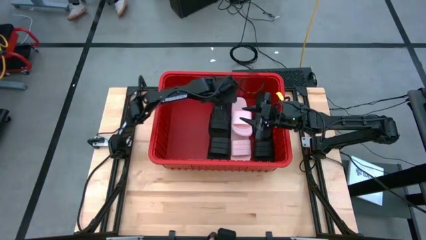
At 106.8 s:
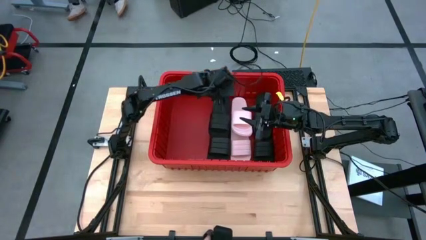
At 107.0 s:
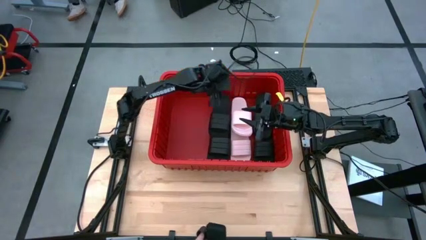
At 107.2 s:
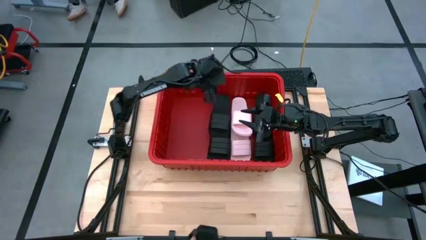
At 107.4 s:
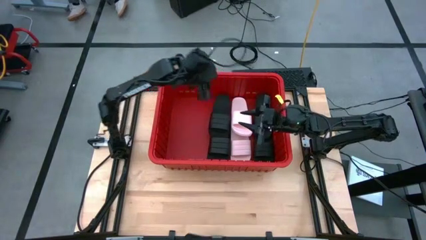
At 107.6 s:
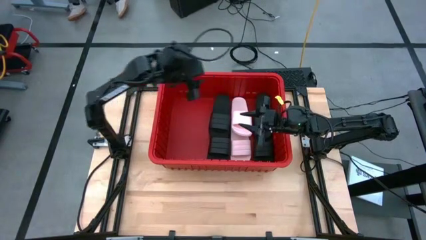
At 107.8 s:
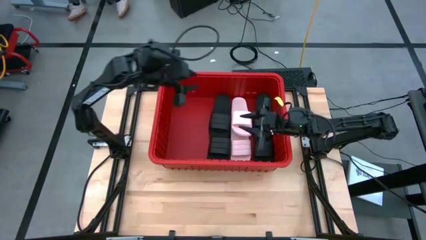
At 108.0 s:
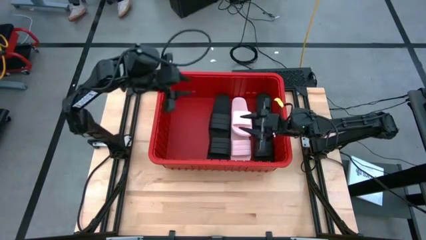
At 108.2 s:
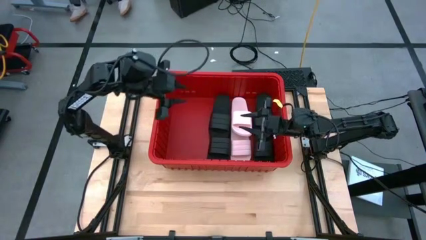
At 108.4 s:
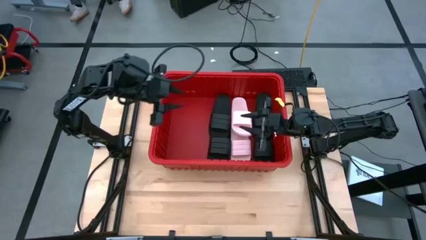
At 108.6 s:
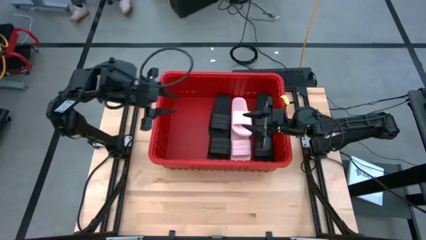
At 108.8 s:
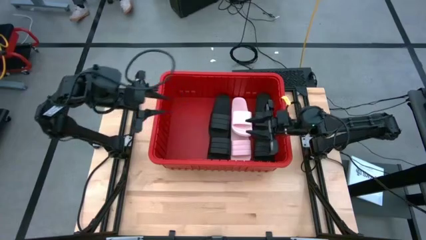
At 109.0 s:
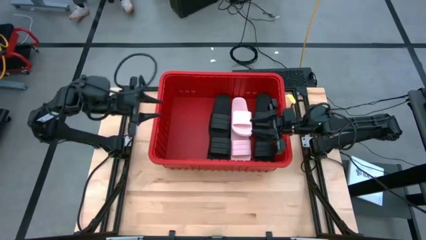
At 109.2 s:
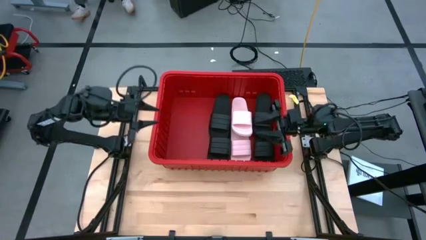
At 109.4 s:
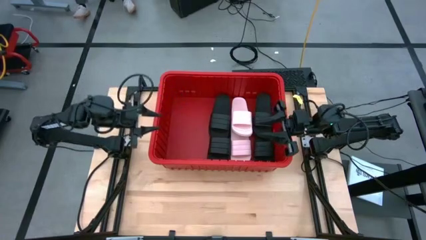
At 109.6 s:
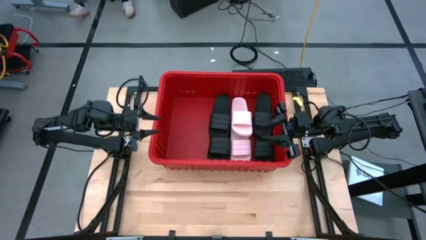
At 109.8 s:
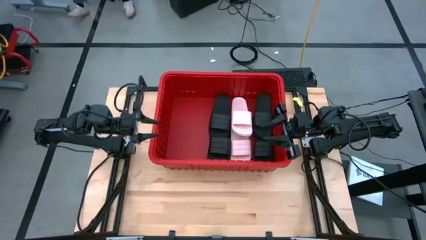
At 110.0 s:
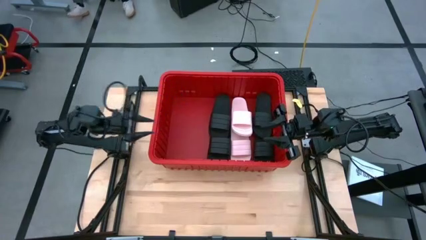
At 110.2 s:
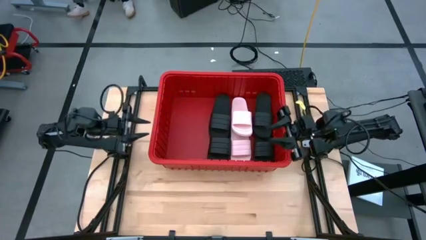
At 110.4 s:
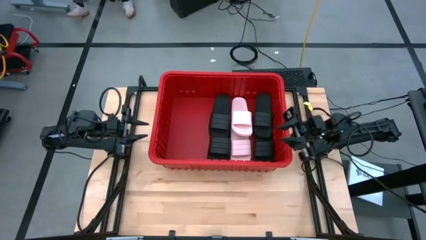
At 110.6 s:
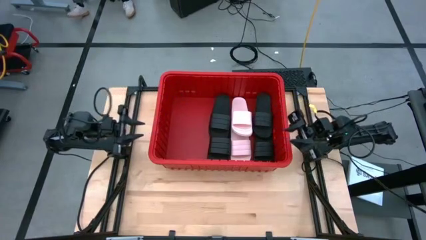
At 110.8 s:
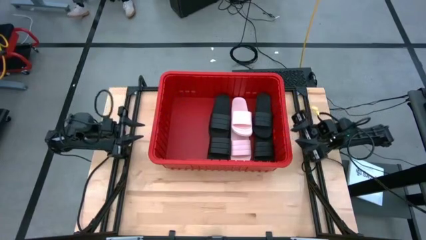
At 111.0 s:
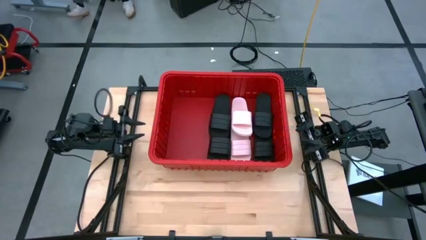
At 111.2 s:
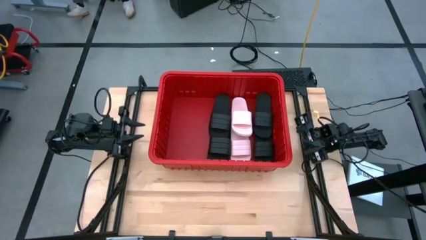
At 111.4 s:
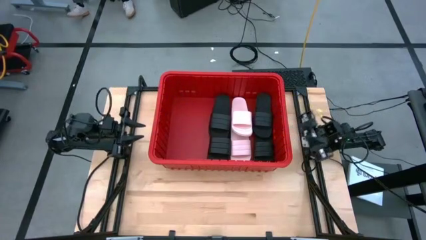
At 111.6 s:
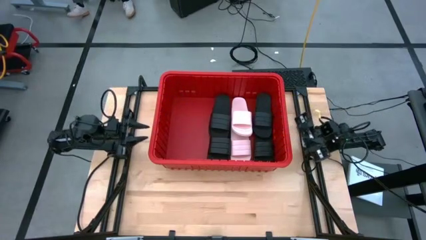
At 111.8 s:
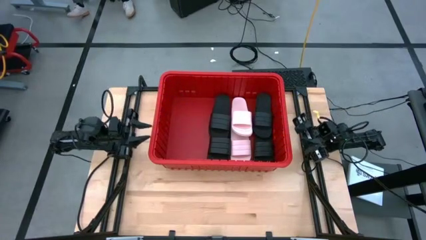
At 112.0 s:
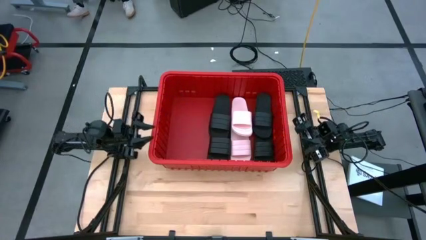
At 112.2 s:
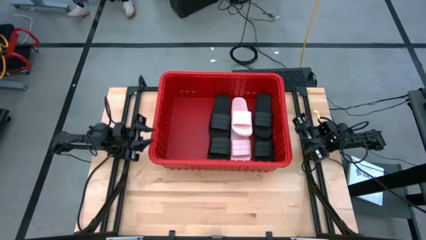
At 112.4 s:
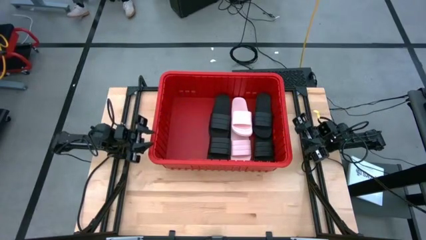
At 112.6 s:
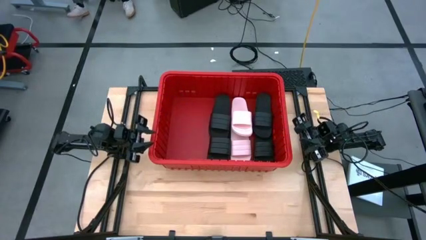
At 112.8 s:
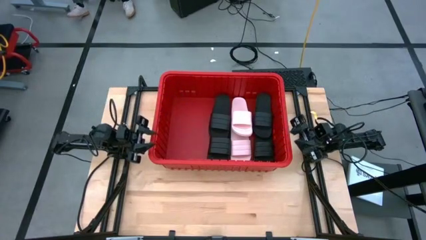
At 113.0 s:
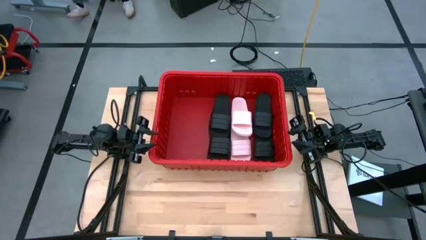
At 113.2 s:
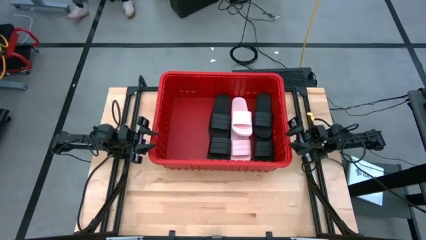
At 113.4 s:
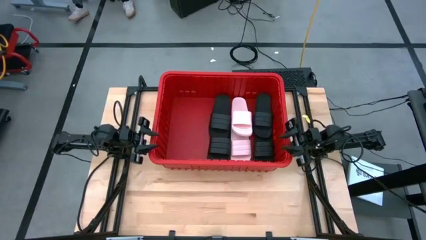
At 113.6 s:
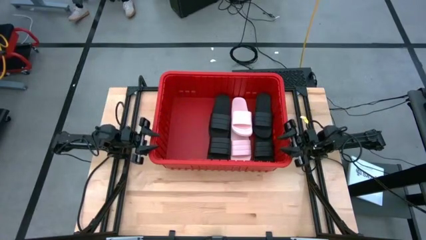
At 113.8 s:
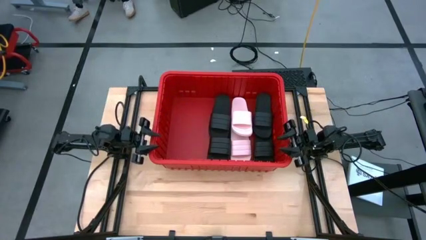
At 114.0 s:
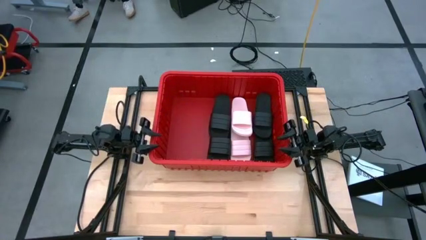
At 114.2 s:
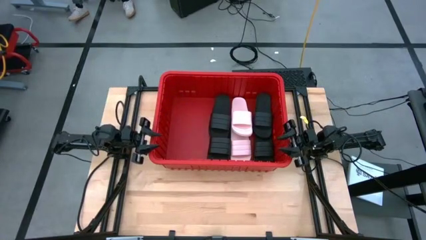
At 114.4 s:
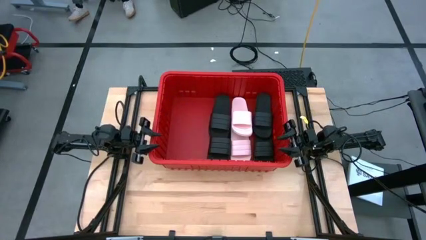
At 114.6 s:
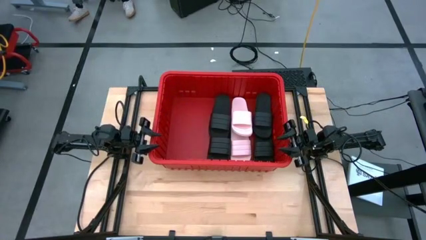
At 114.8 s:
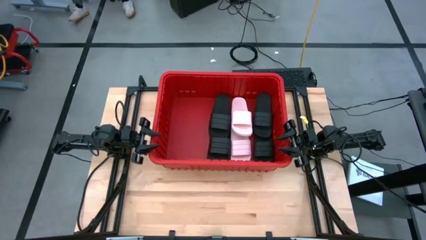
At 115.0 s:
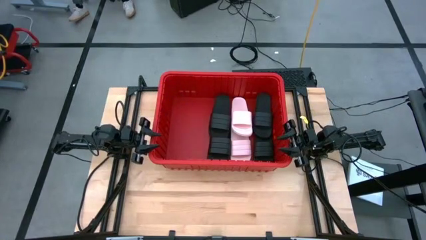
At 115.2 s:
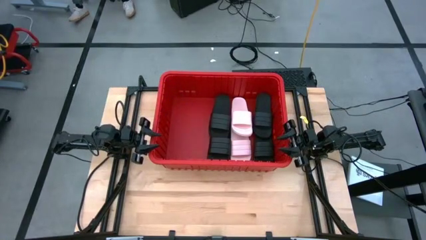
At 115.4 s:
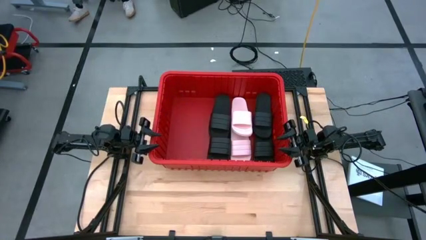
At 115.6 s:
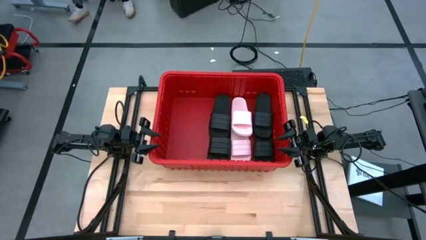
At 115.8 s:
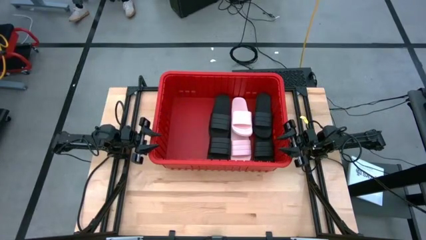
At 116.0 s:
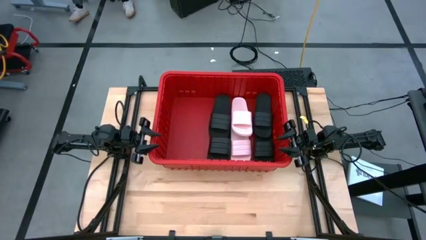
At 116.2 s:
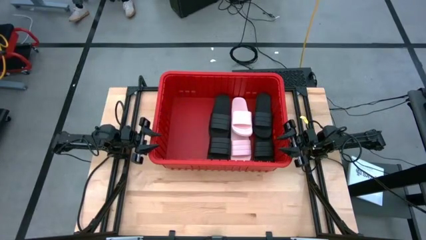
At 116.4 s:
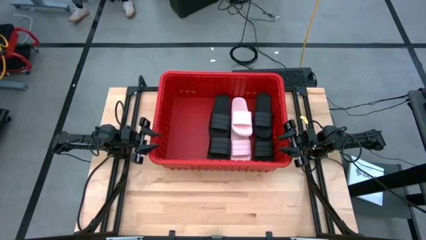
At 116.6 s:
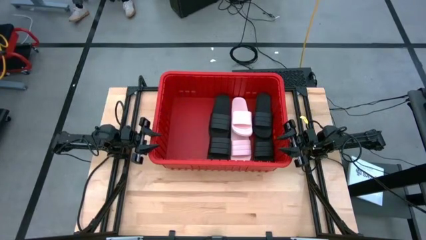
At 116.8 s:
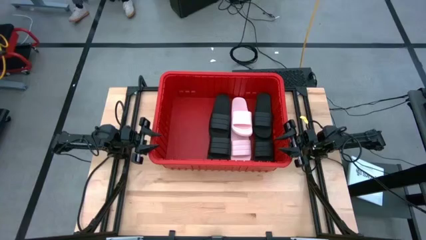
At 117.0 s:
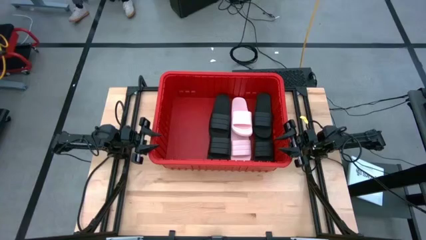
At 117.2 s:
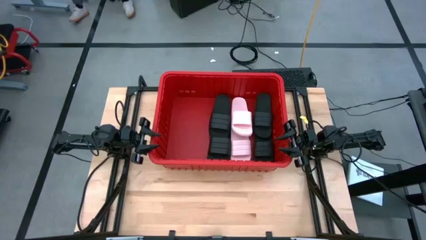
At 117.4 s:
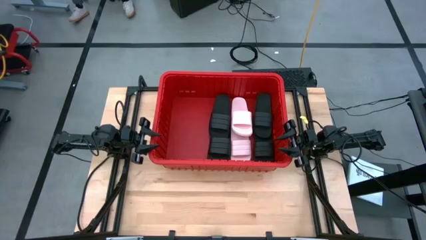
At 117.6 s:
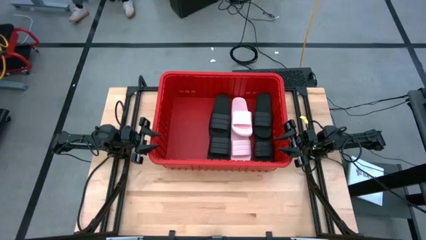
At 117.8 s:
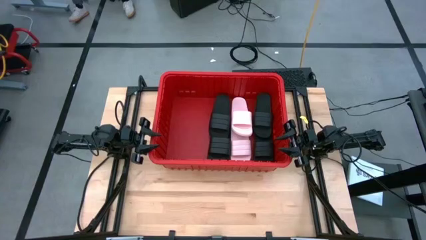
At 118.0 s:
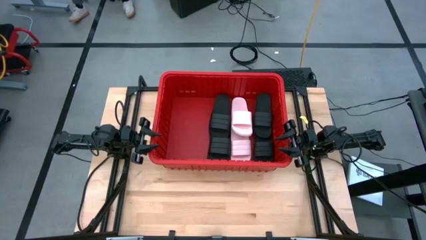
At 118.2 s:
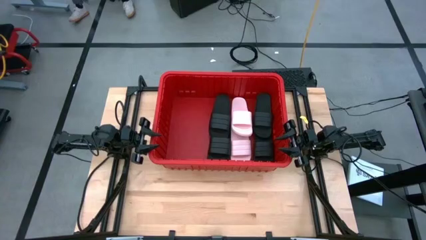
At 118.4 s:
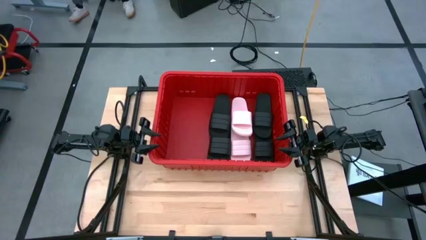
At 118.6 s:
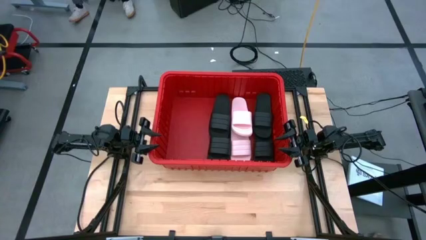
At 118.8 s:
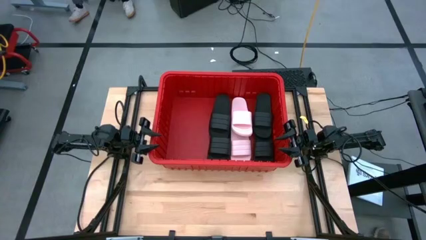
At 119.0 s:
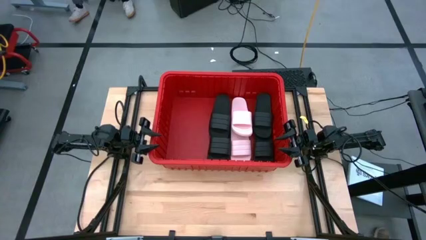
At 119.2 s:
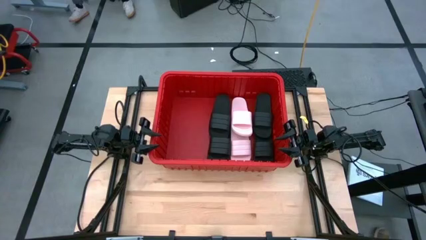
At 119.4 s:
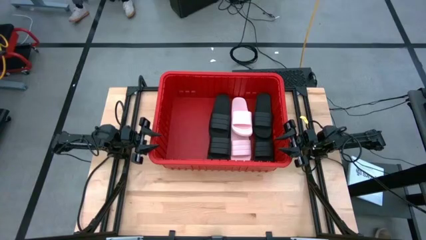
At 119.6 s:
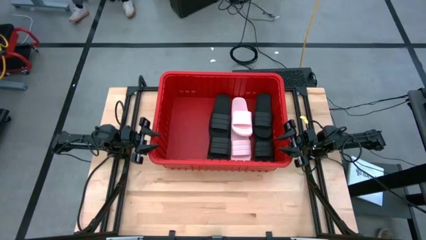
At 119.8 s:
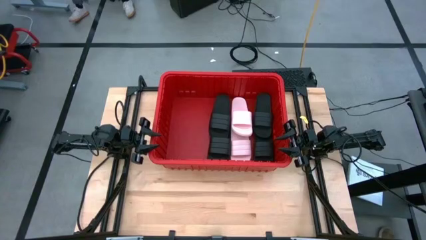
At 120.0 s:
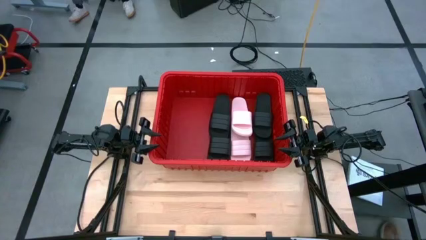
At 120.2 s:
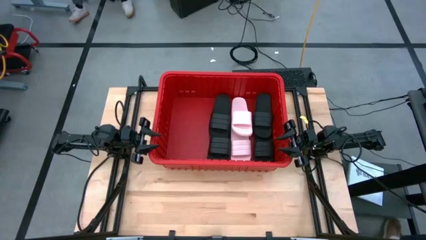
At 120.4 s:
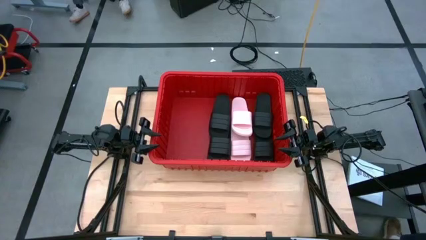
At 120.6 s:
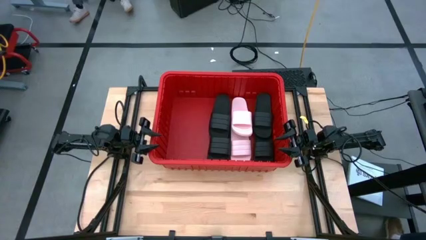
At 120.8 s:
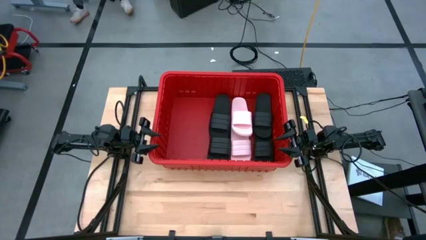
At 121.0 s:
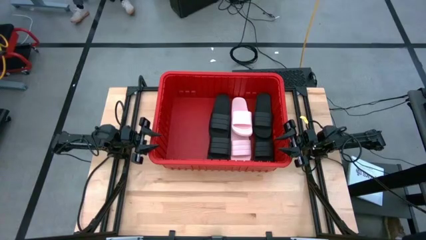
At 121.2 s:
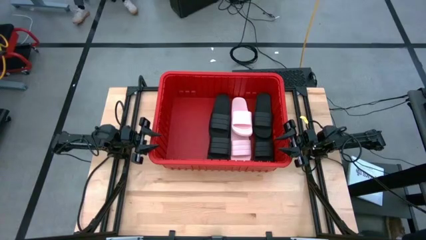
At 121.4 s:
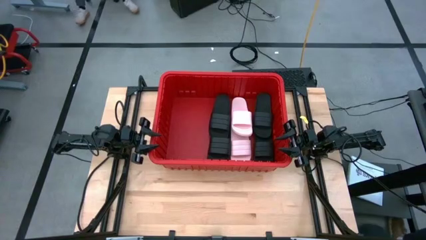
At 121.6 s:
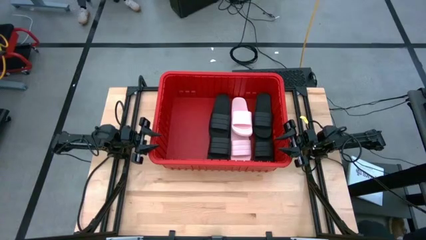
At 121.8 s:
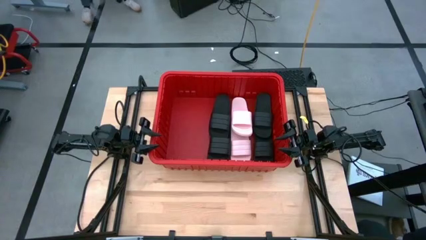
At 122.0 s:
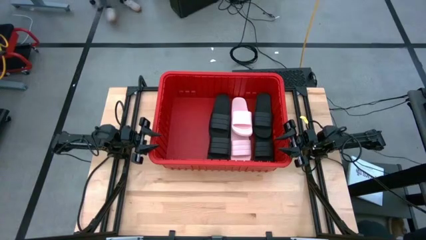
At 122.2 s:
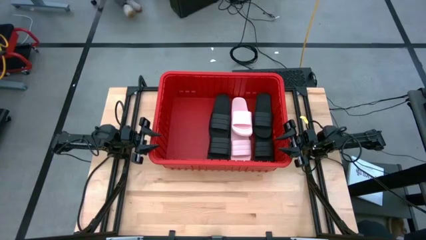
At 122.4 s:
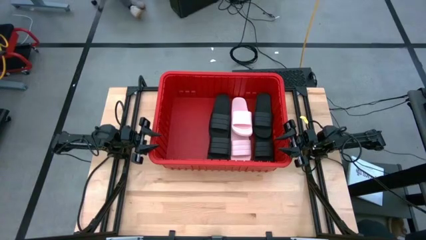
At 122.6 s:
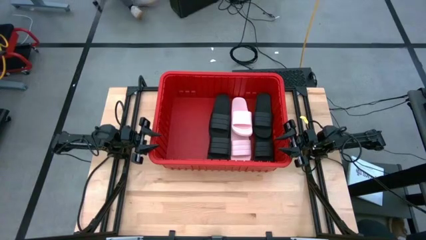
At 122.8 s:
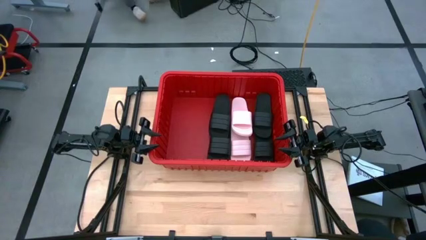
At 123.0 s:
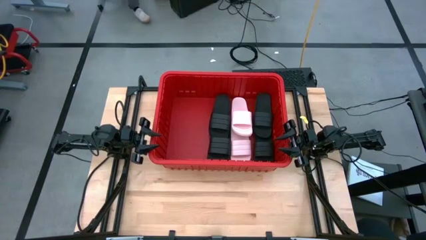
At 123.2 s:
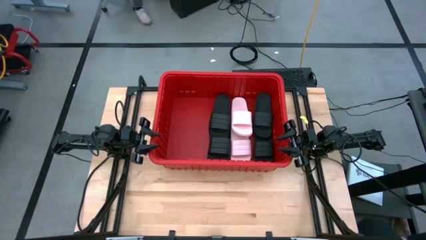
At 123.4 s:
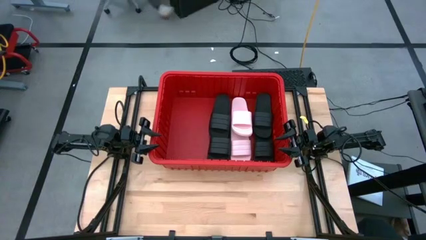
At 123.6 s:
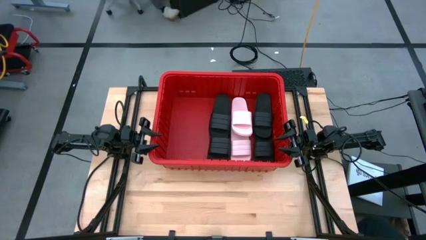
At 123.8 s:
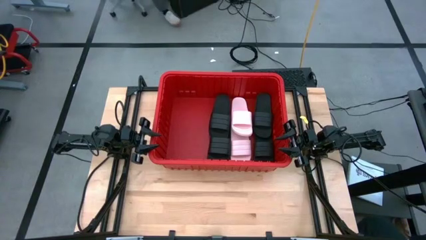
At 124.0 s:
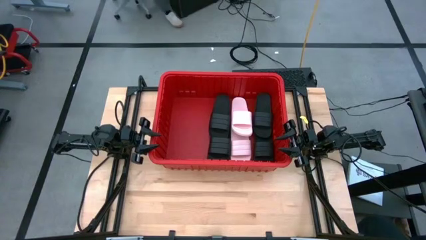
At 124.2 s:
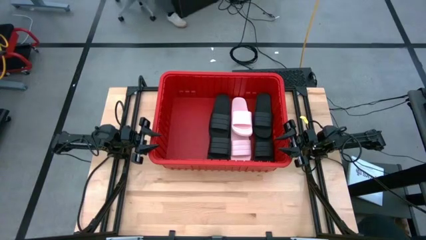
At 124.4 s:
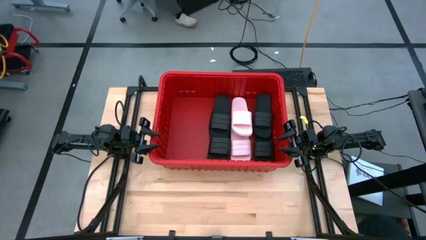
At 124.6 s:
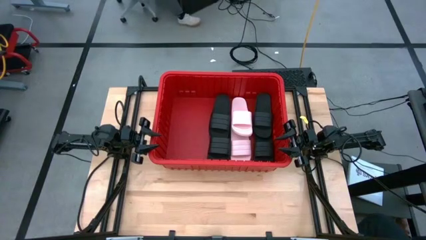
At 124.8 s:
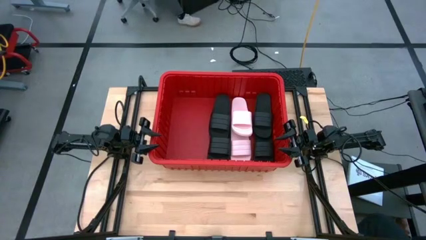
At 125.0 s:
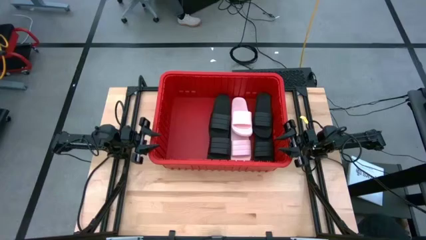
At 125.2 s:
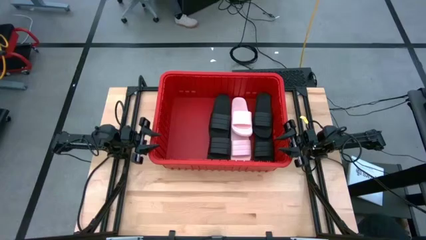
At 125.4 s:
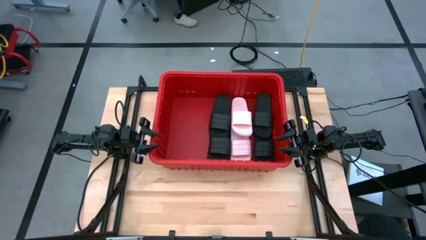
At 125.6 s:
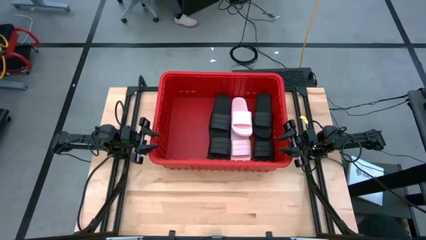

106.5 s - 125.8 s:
Task: Pick and place slides into bin
Return to Home Position
